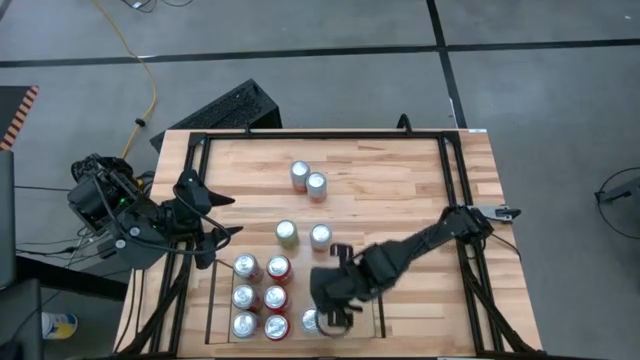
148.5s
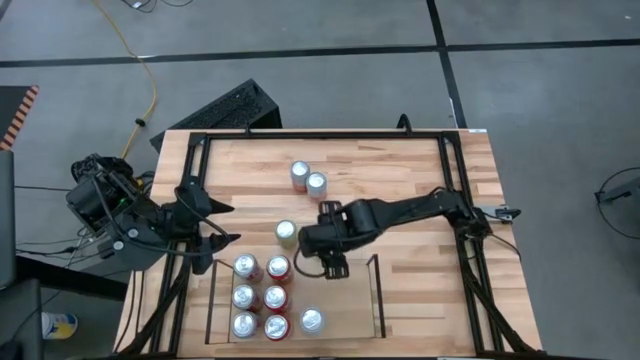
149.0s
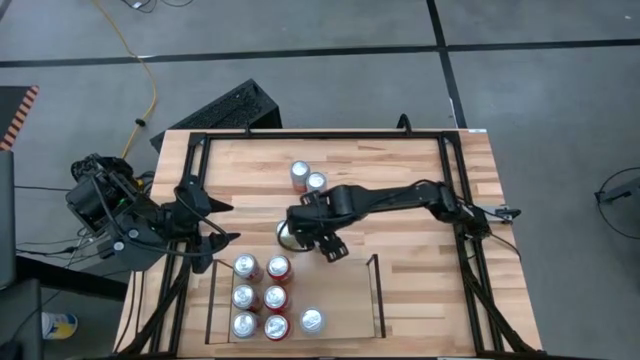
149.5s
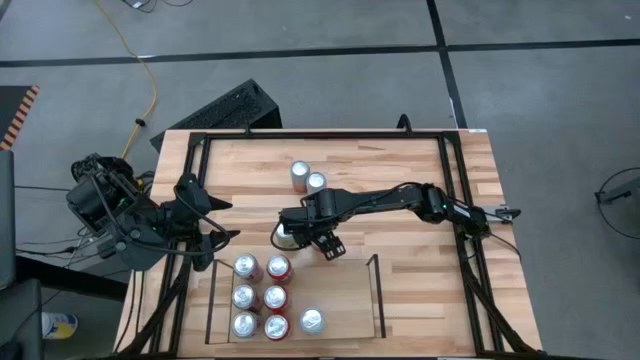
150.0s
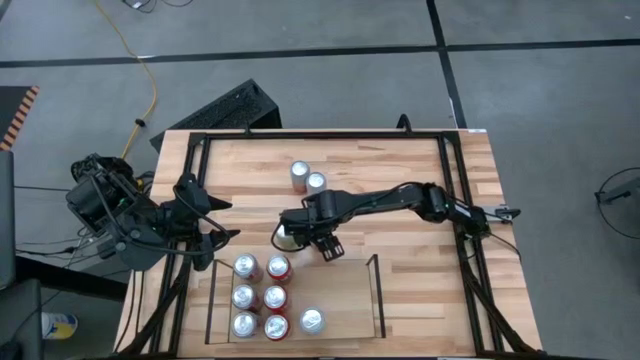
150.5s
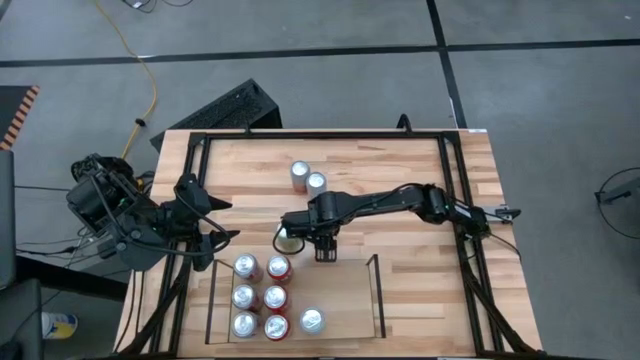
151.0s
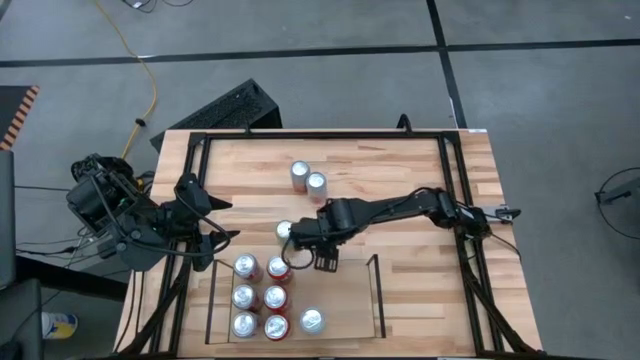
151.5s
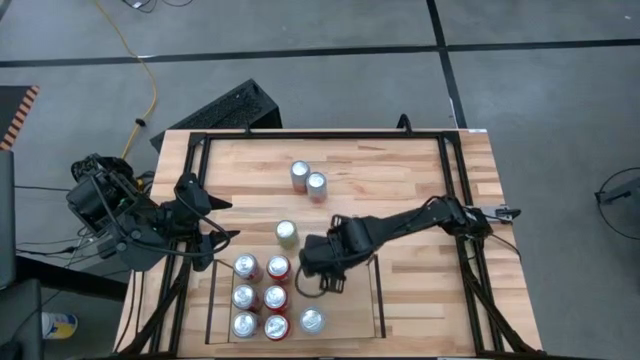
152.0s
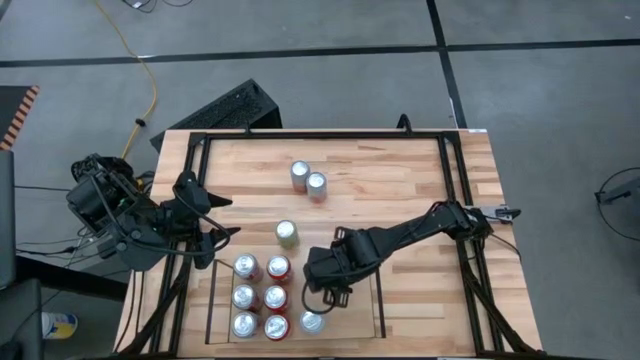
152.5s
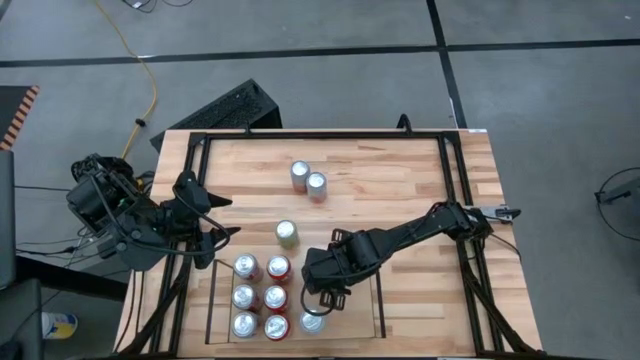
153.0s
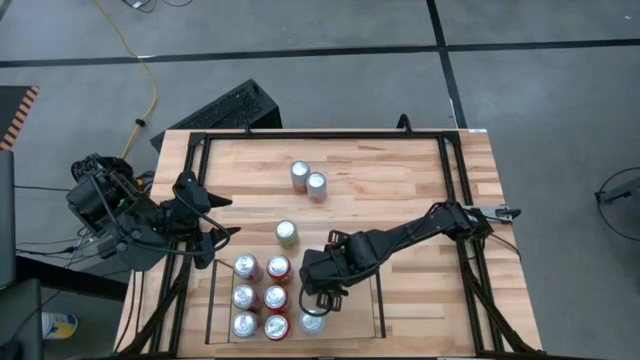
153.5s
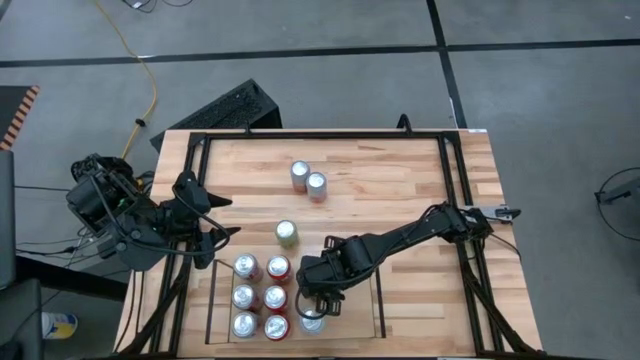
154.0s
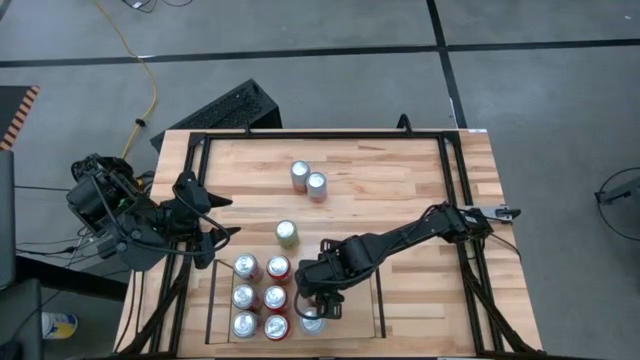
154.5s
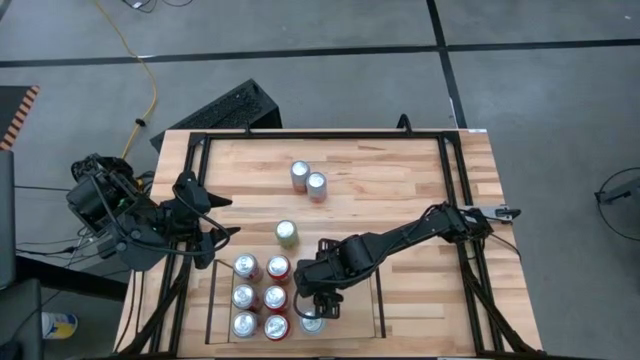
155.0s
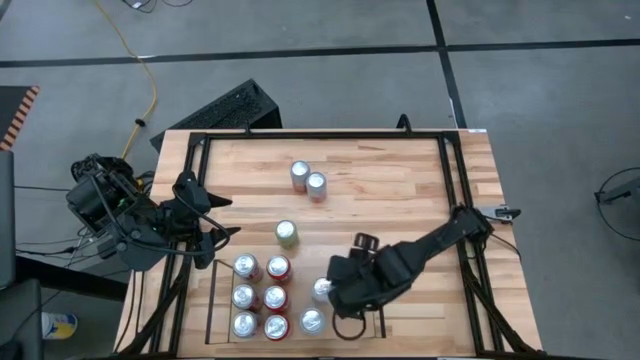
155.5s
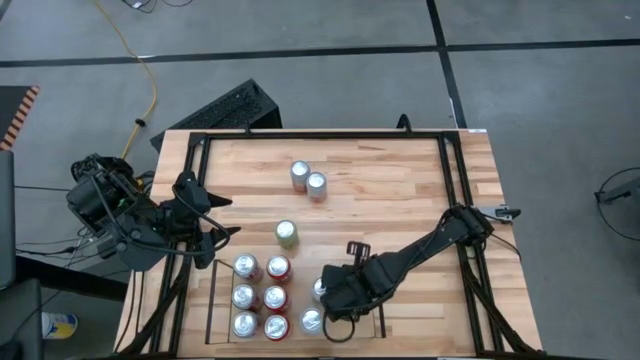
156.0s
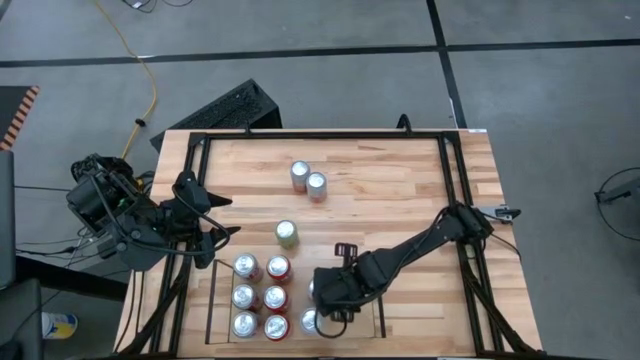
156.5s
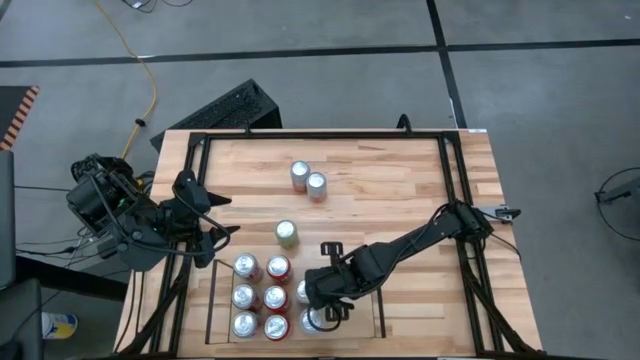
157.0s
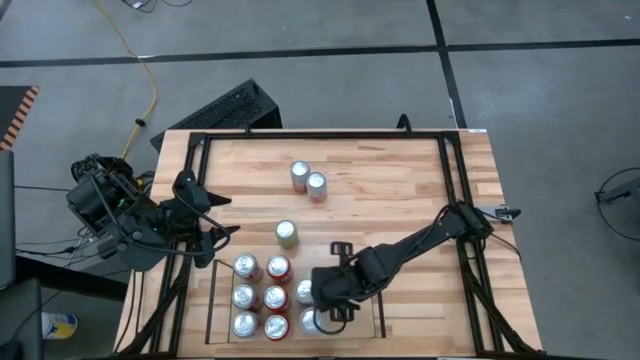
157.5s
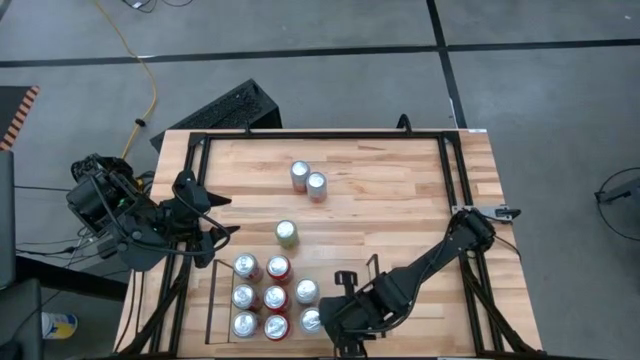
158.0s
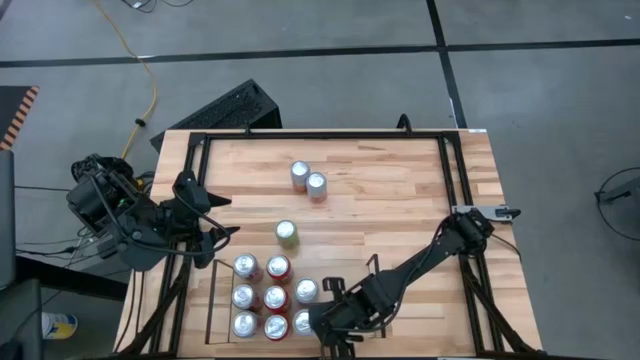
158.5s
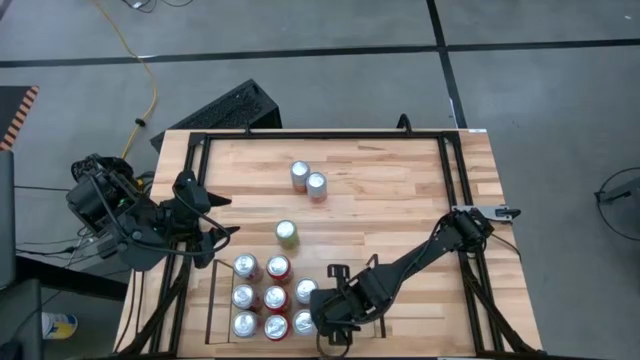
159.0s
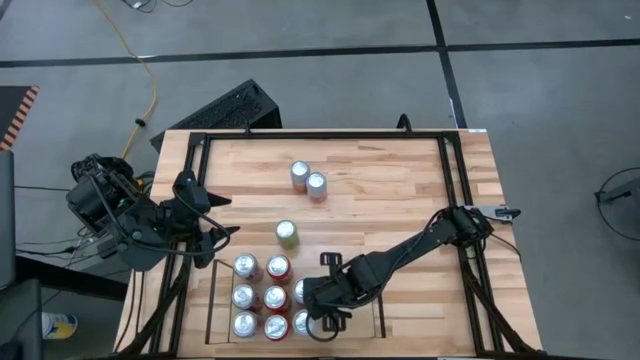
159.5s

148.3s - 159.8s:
Task: Place canned beverage on shelf
Put the white soda can on the shelf aligned with the other white soda can

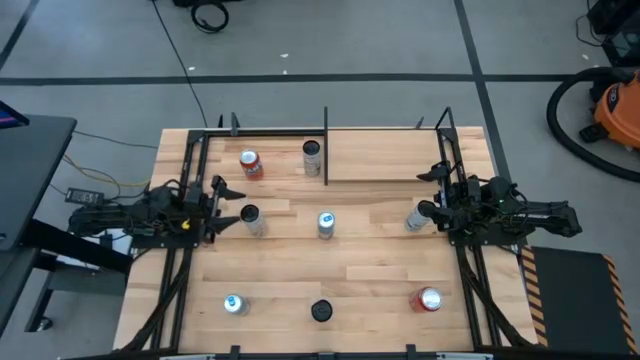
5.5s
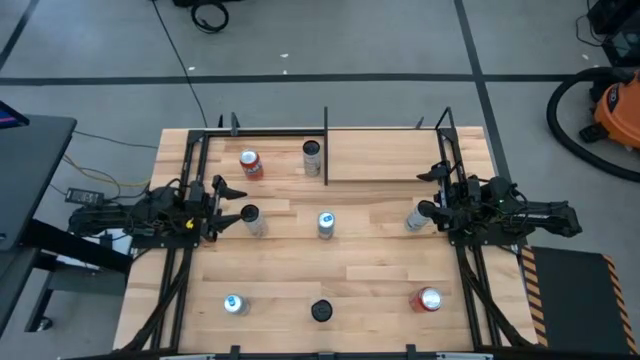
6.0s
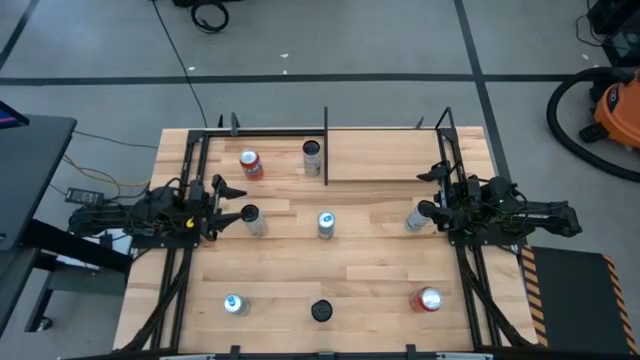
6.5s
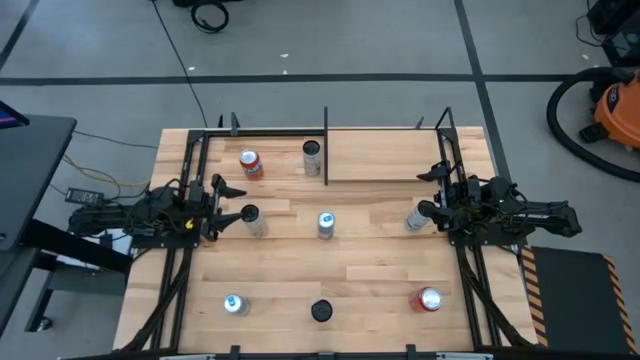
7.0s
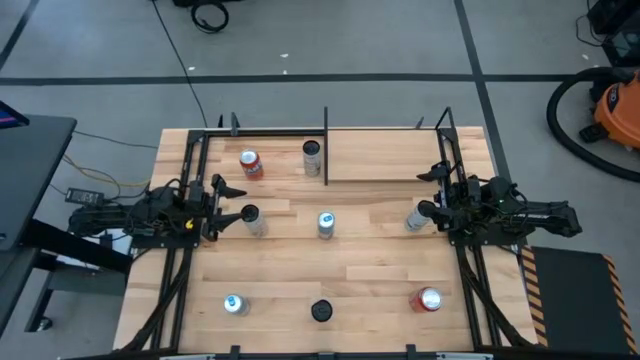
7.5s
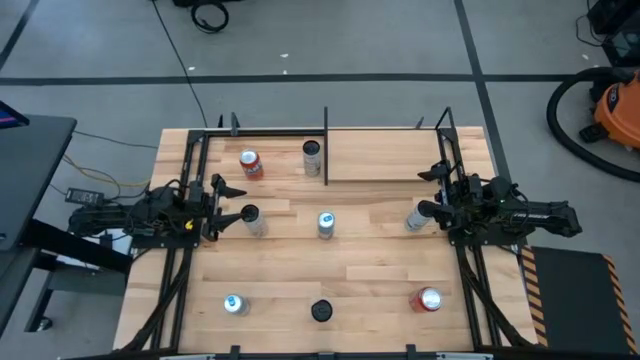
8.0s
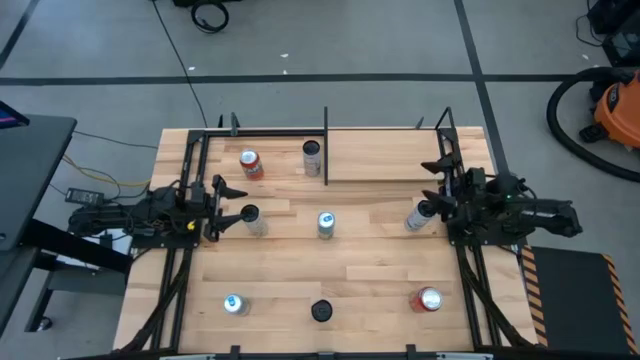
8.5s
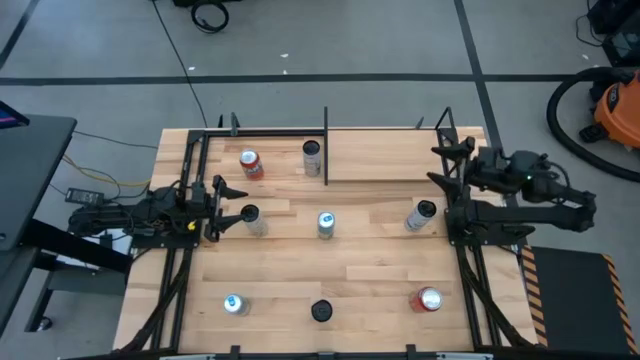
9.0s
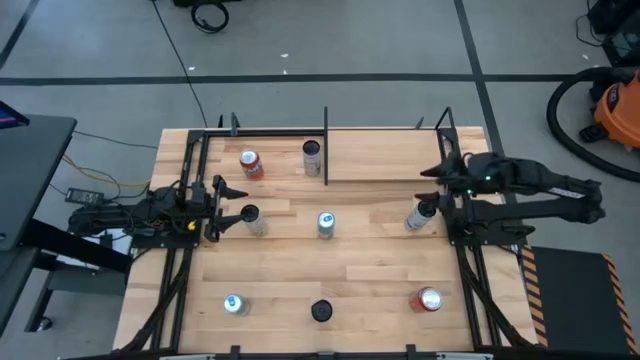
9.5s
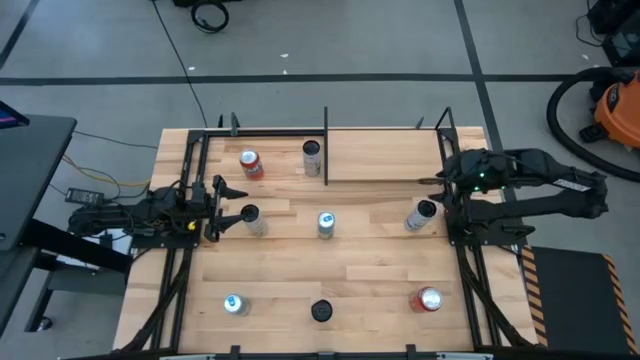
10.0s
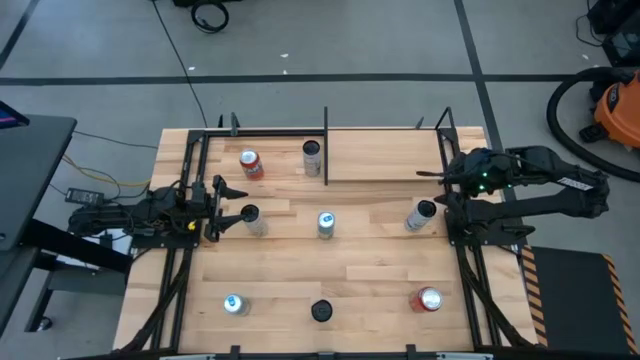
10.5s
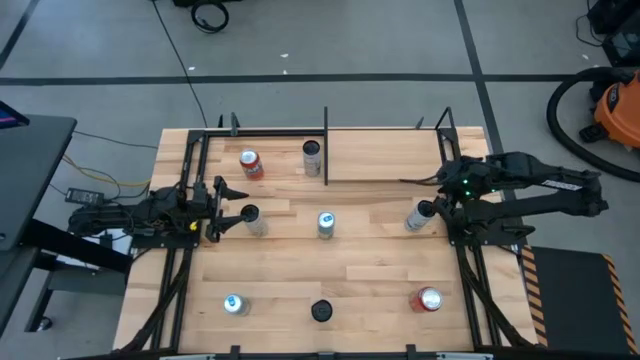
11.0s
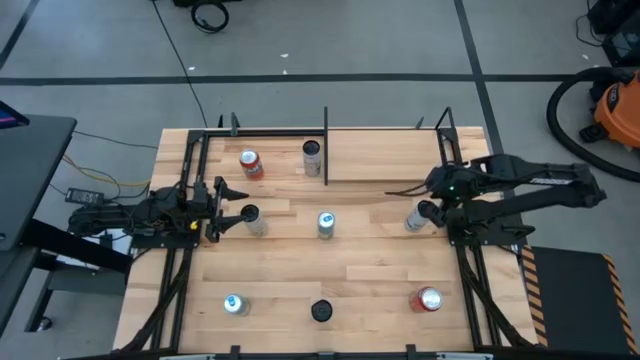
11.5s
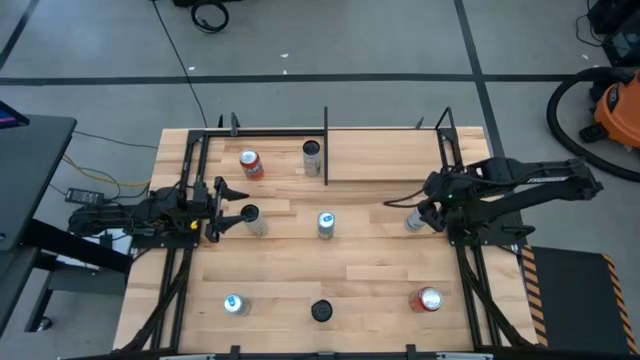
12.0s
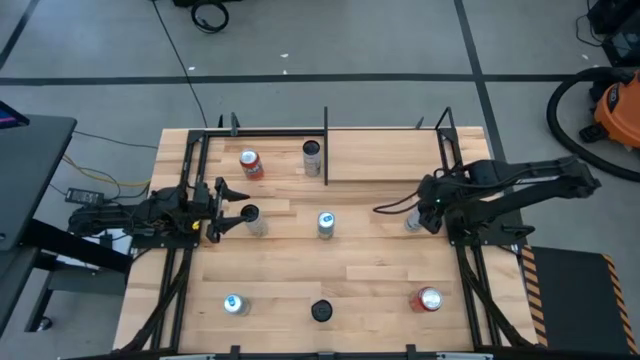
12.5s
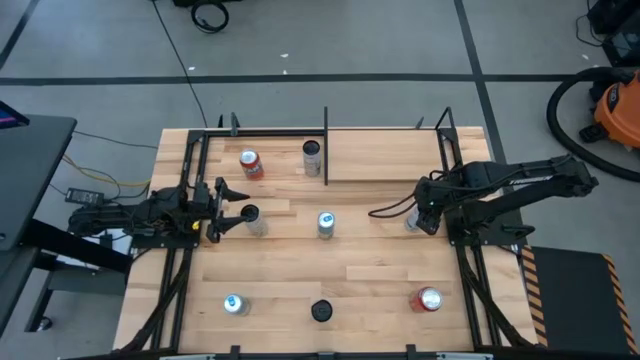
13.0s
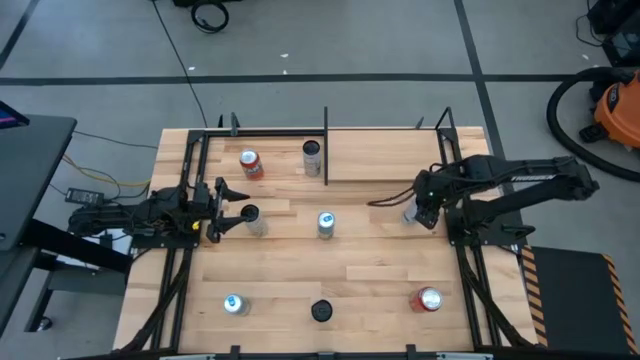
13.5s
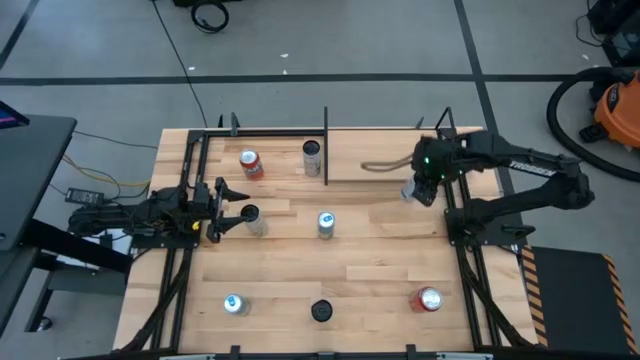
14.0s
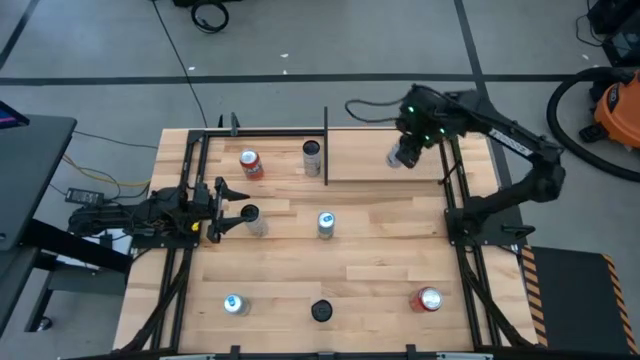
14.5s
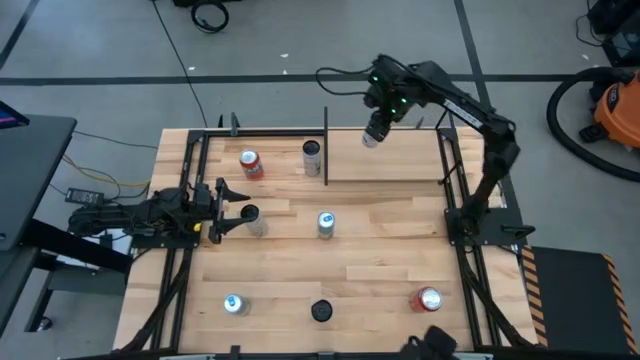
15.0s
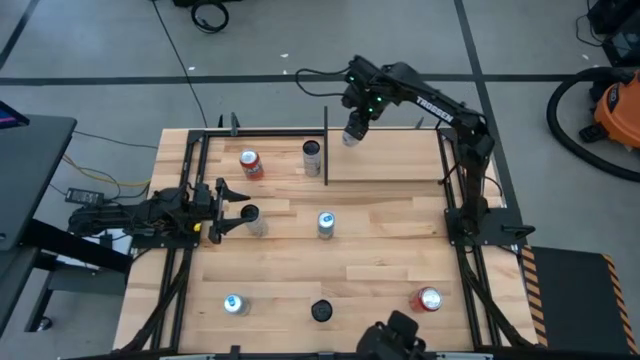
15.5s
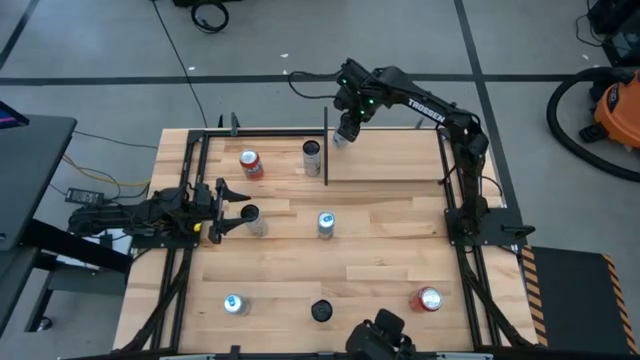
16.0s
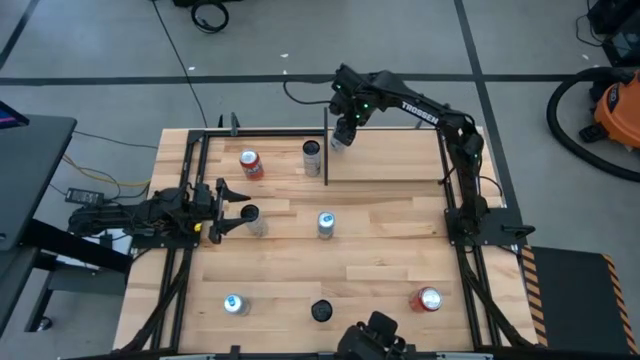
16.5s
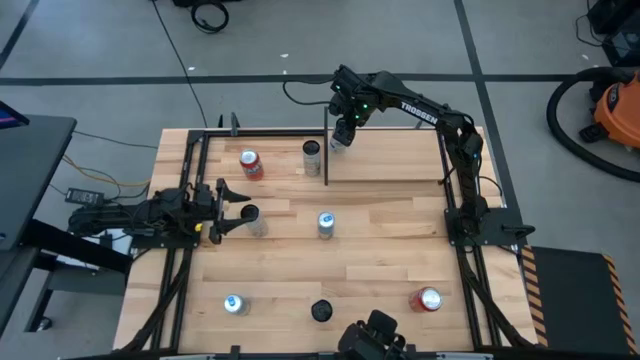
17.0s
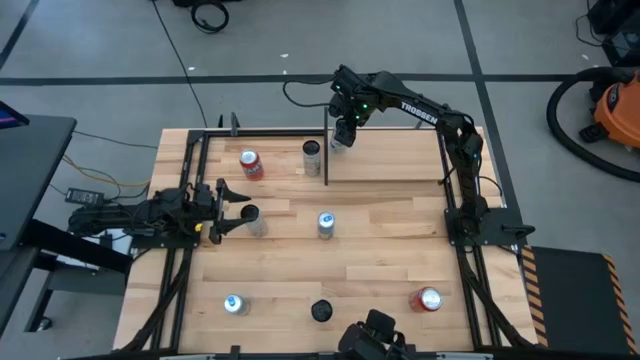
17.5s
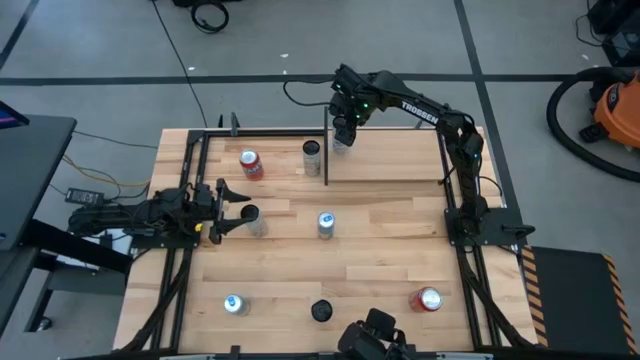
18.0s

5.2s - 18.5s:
Task: Place canned beverage on shelf
Put the white blue right soda can on the shelf
